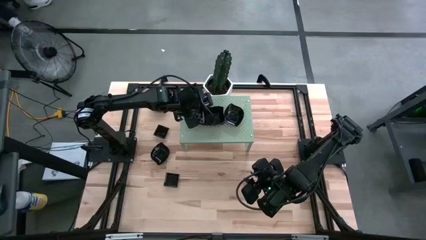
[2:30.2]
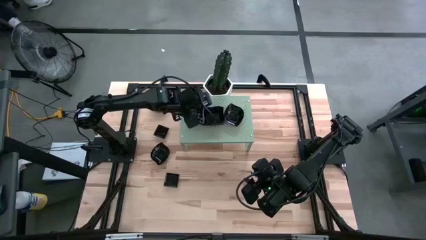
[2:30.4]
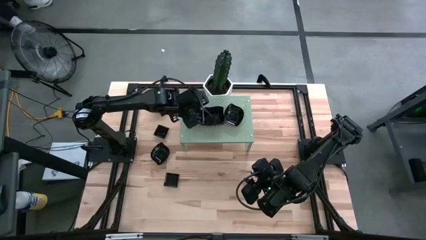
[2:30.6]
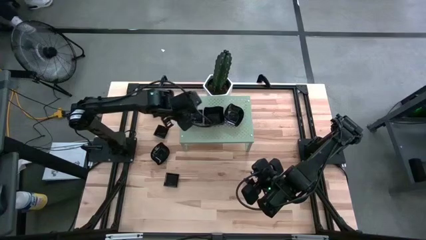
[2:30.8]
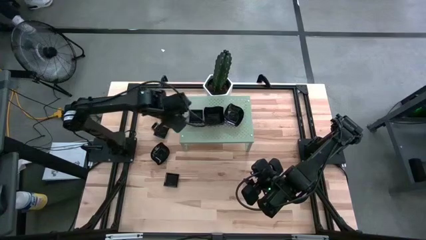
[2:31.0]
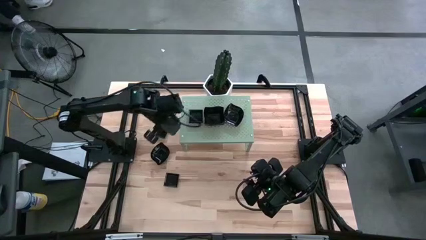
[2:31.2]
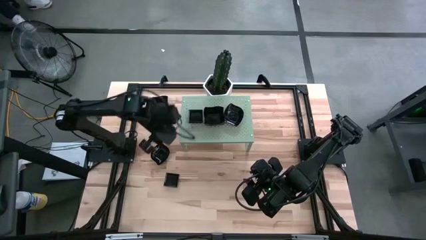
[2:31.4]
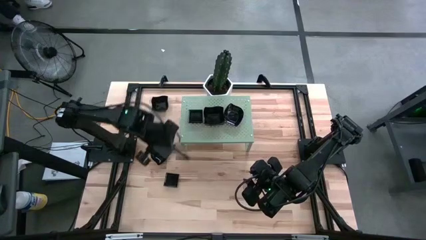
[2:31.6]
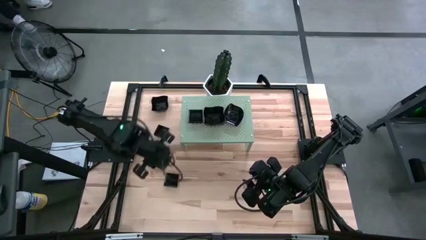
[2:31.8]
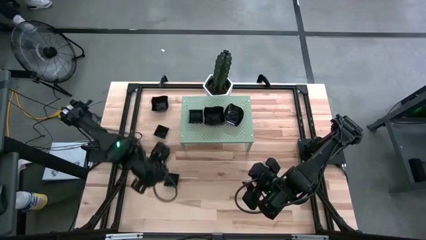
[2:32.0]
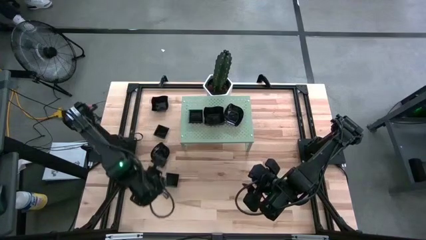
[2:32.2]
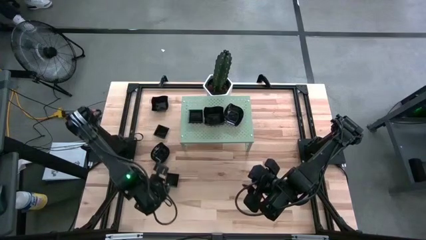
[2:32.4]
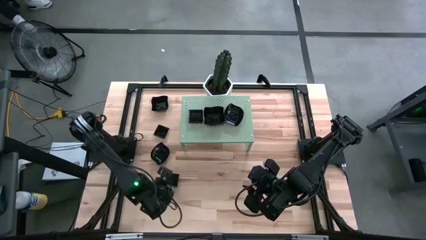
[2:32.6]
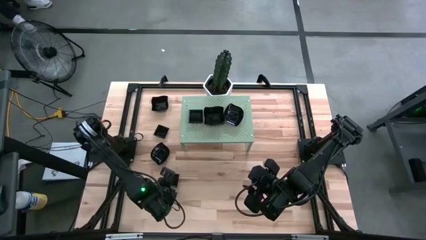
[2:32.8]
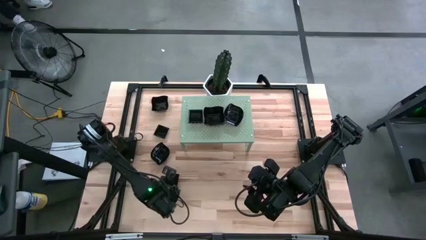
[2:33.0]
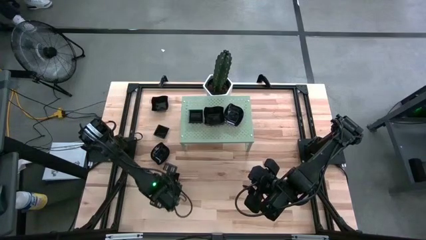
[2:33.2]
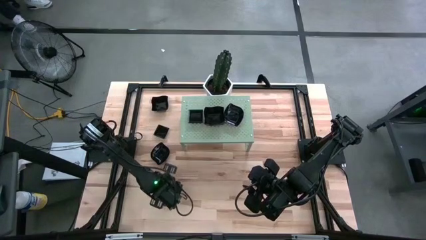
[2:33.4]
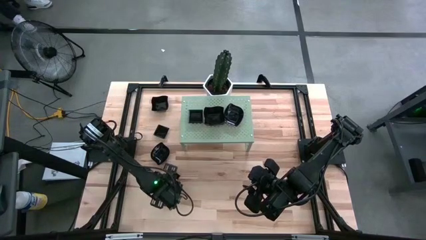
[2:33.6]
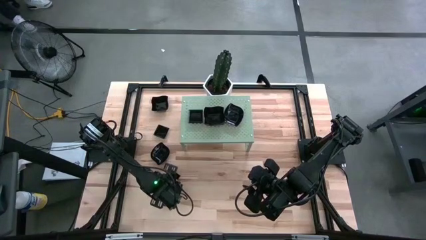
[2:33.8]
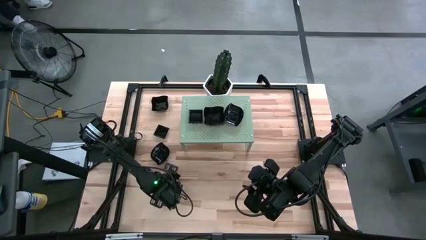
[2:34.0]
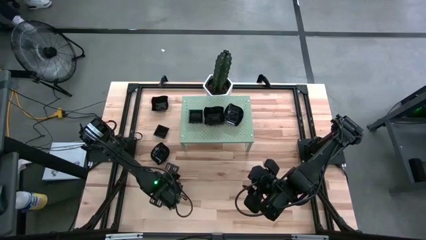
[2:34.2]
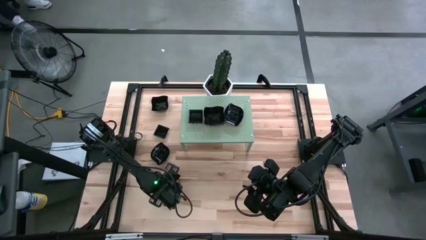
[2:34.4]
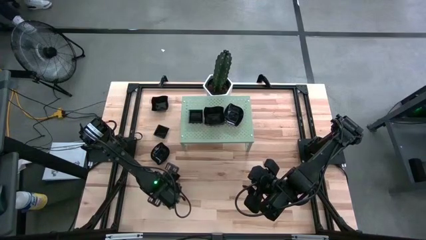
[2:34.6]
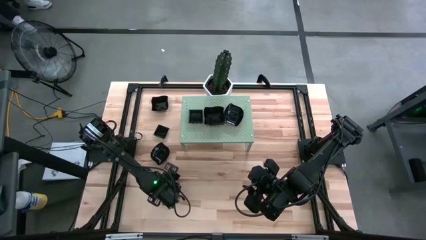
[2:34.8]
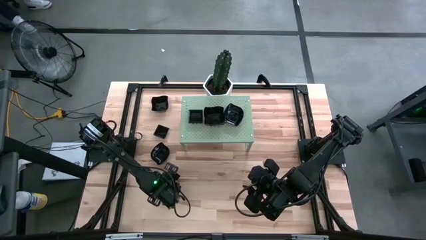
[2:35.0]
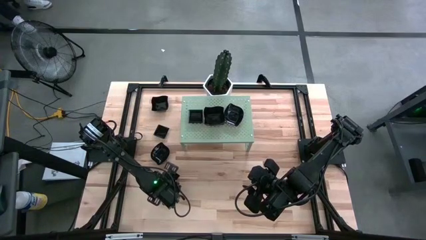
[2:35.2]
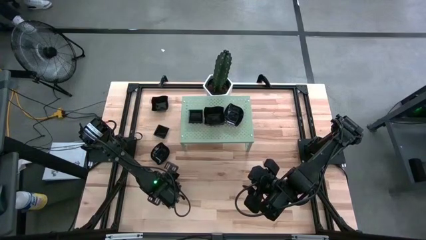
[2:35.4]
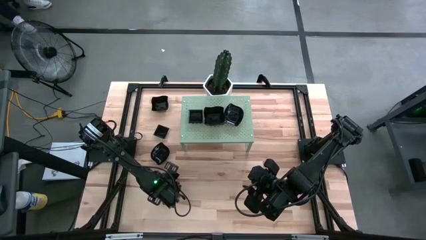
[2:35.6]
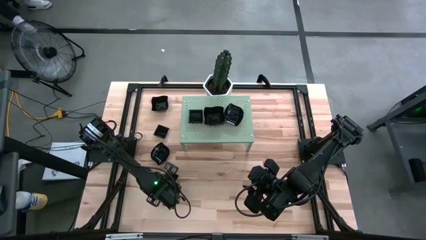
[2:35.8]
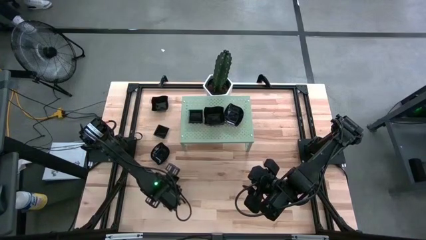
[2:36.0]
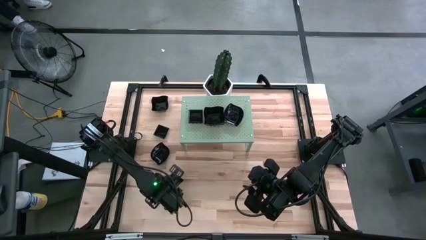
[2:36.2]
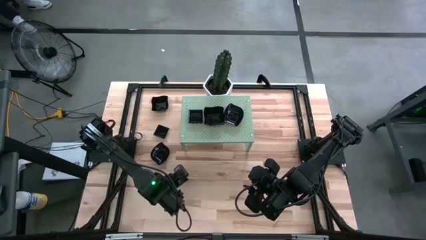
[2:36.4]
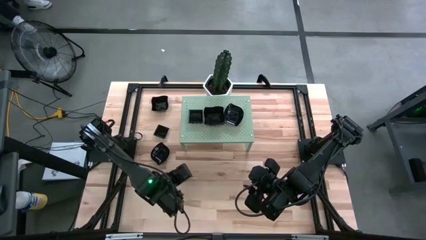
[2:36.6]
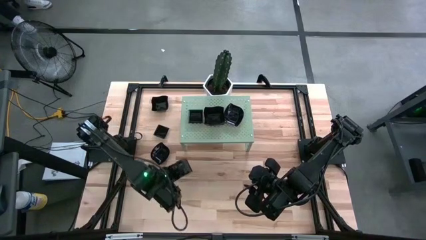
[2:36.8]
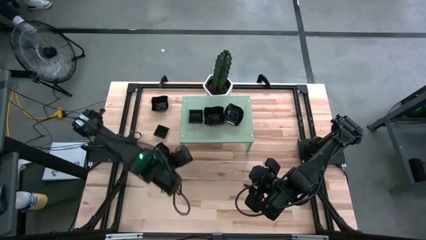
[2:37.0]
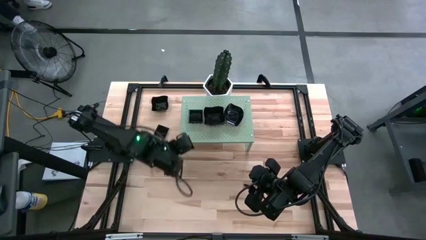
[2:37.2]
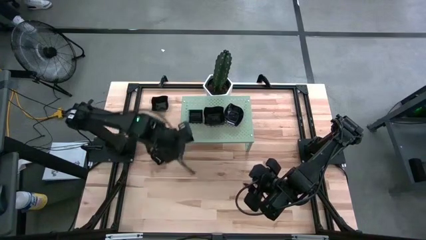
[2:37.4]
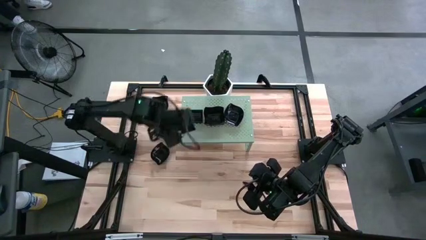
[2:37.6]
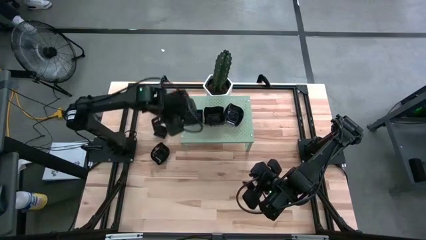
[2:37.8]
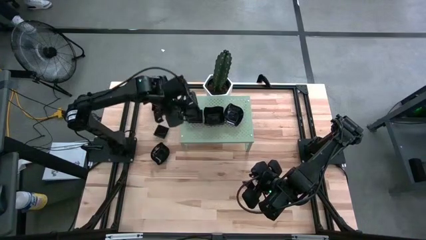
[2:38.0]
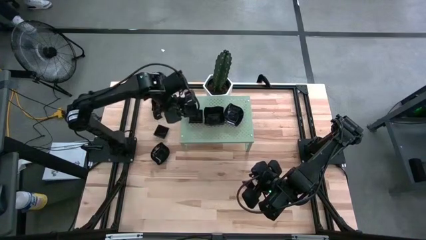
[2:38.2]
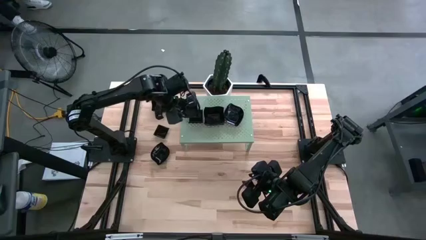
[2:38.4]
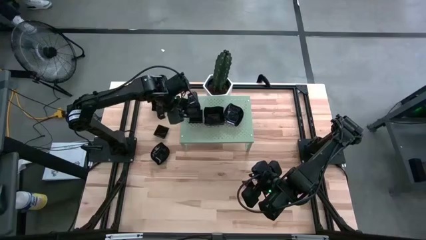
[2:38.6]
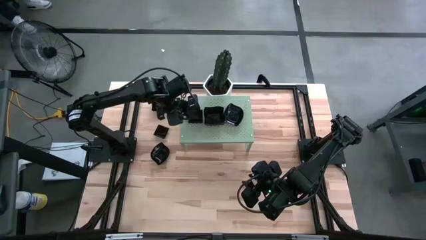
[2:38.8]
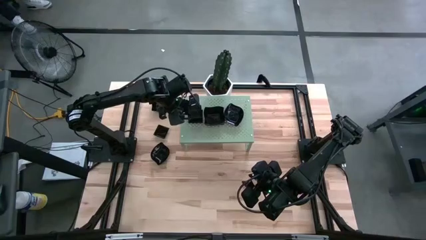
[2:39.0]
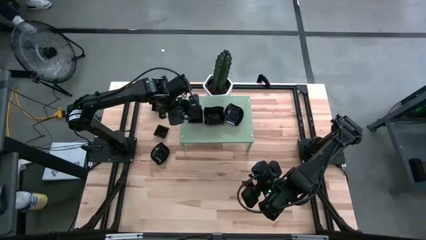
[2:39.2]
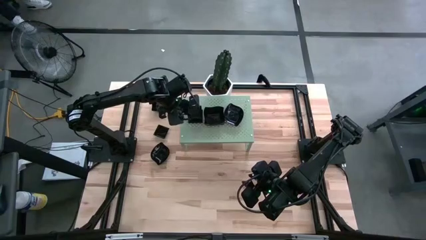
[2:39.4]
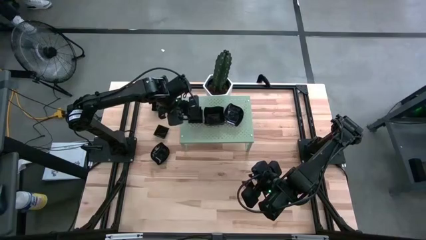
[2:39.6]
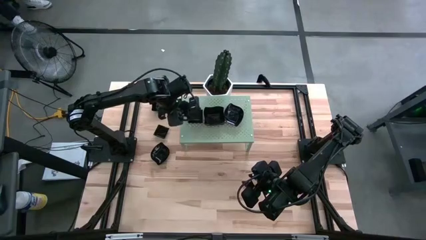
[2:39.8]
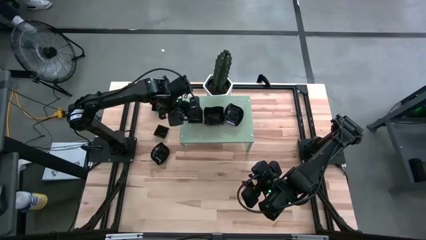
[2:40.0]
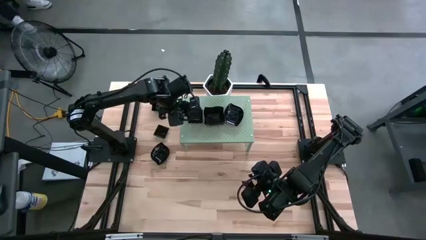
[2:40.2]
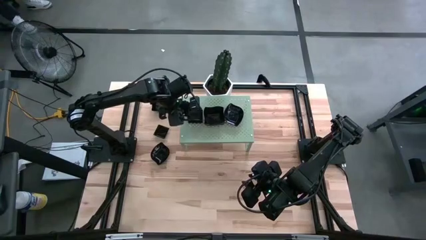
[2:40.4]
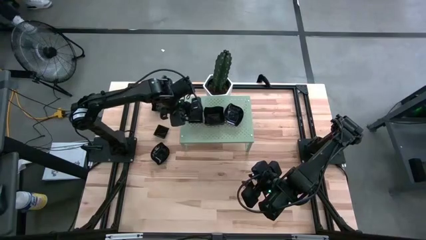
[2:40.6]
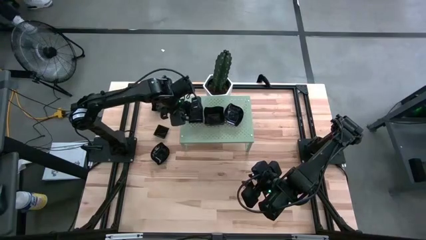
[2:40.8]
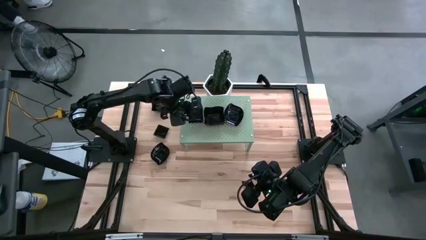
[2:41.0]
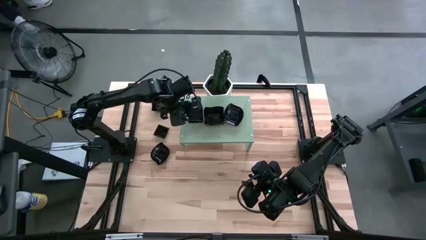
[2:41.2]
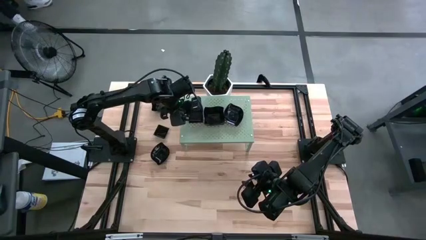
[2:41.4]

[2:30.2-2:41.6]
Task: Pick & Place Mini shaped plates
Stack the square plate on top of the square plates on the shelf

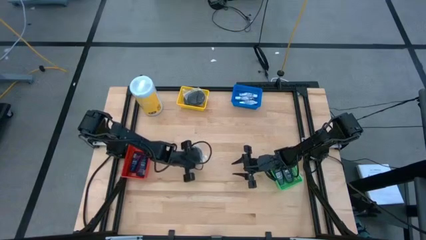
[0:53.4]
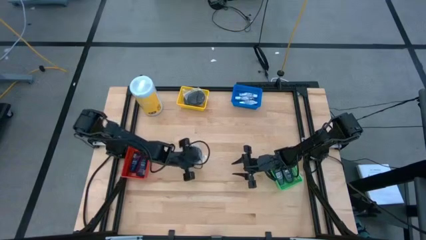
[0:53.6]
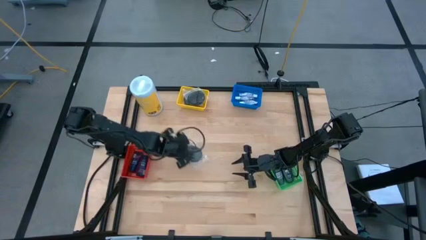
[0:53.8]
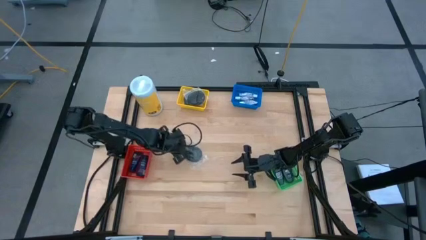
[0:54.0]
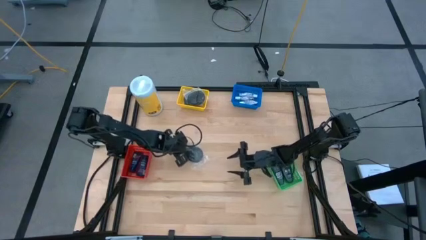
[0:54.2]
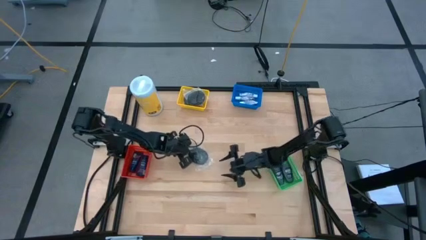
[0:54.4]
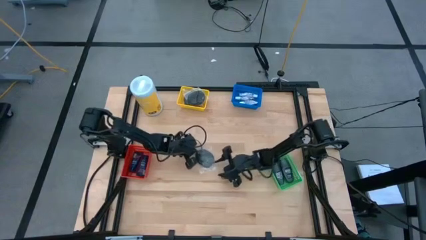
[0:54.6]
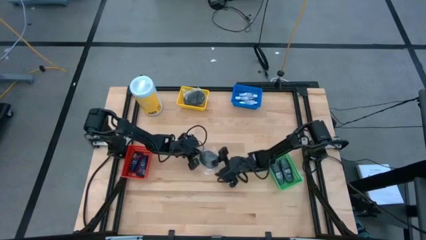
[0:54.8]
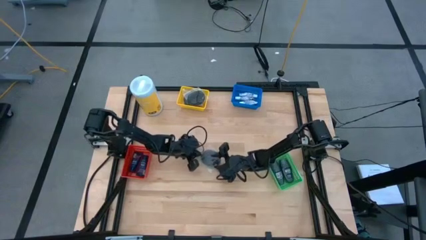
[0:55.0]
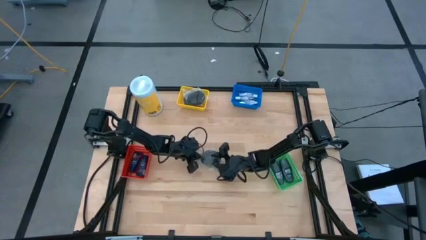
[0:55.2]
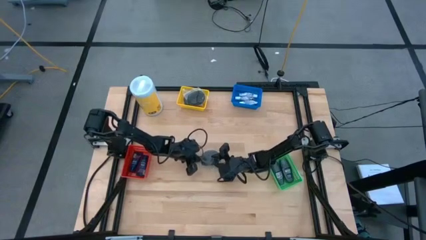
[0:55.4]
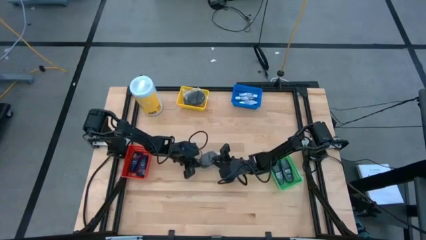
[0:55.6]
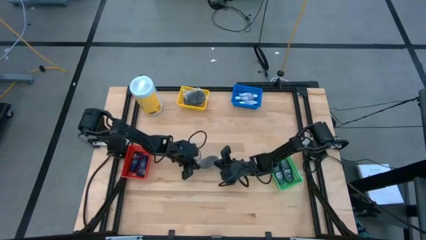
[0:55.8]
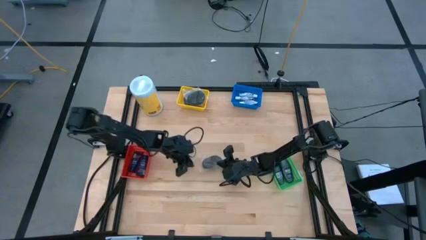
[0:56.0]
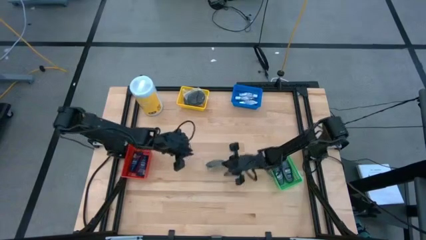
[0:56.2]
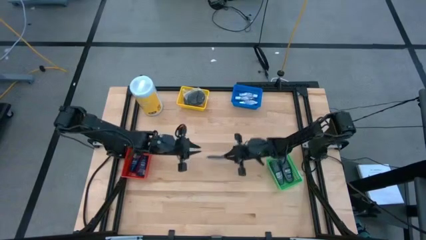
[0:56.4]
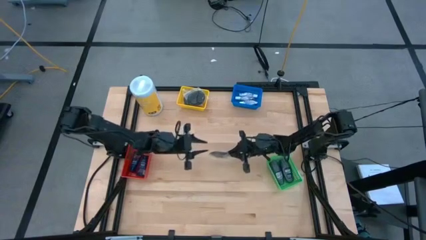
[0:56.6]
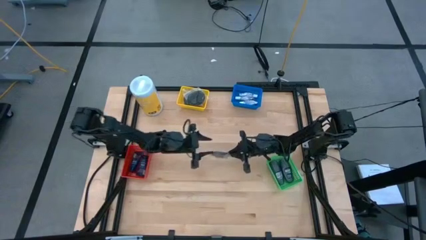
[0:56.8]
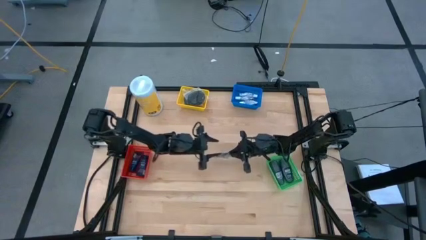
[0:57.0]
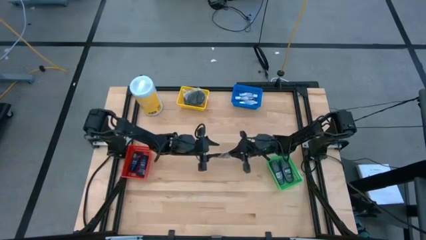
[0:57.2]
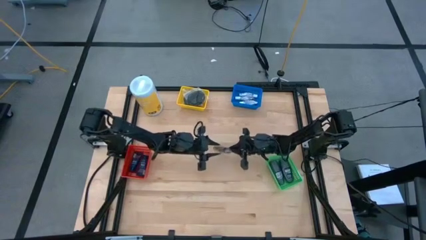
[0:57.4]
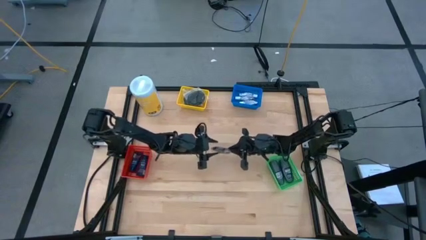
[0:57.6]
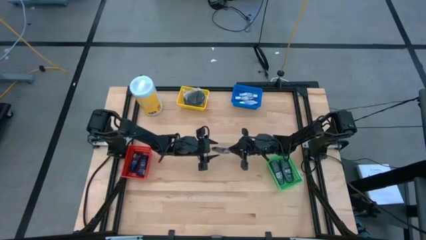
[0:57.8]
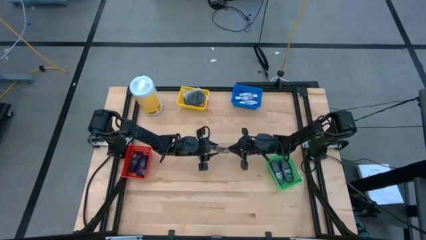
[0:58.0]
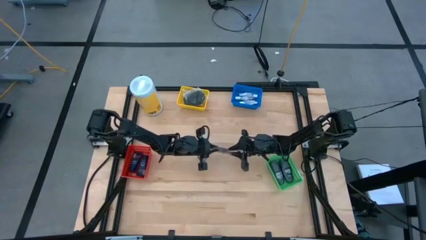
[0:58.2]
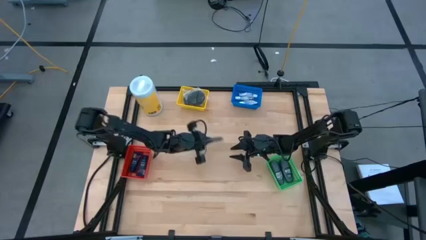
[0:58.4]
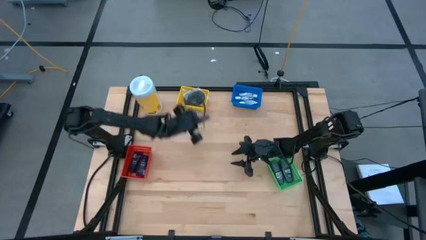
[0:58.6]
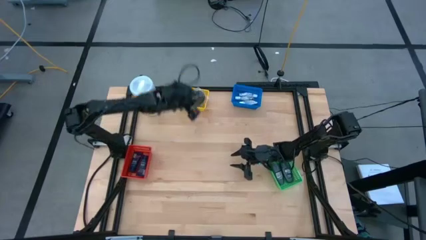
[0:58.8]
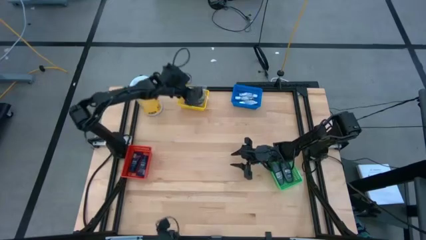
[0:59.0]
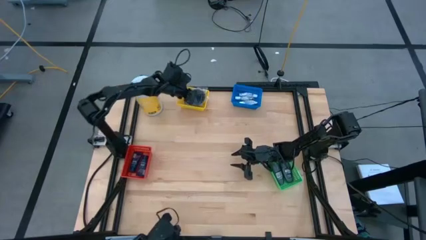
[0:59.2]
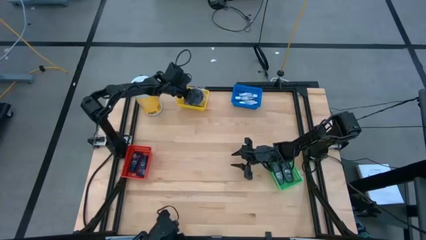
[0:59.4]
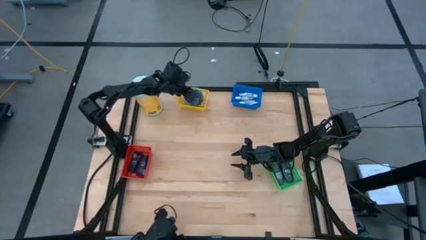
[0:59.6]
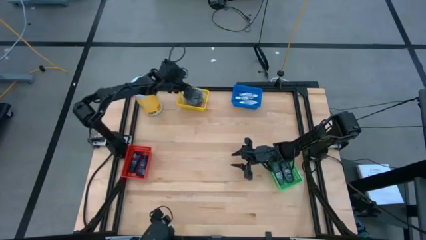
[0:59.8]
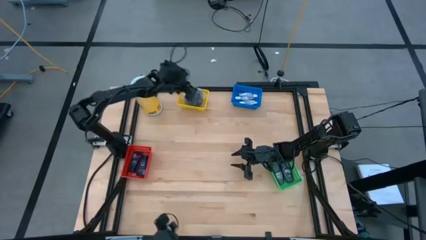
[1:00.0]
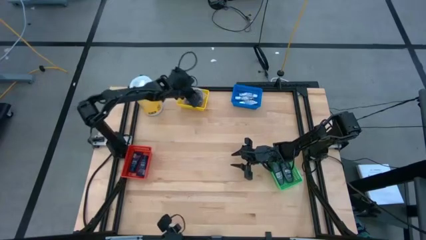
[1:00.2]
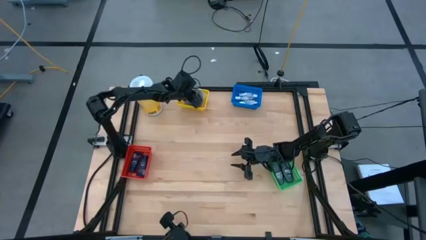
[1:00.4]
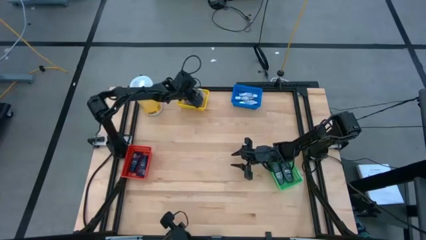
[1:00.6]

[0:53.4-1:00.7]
Task: Pick & Place Travel size toiletries
Put the black hairbrush into the yellow bin
